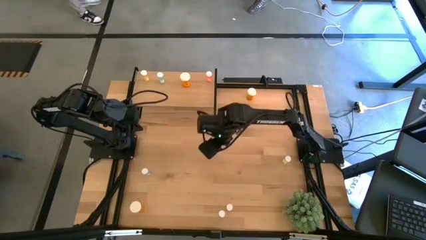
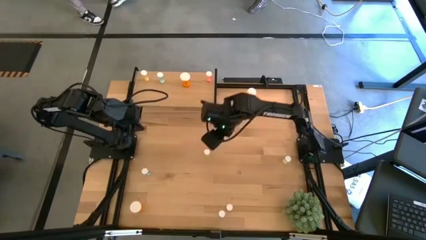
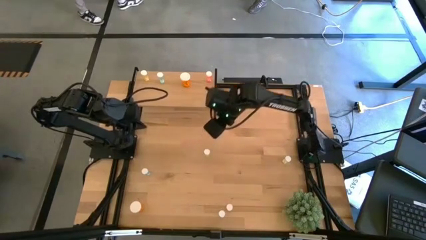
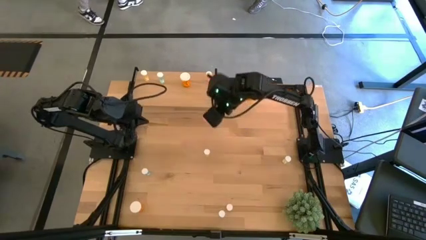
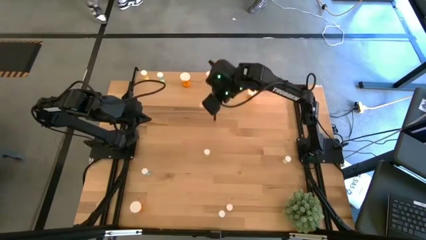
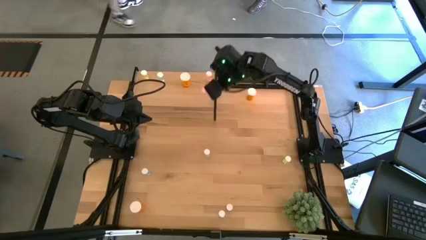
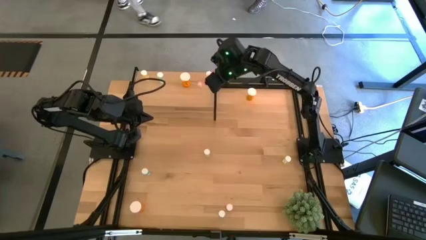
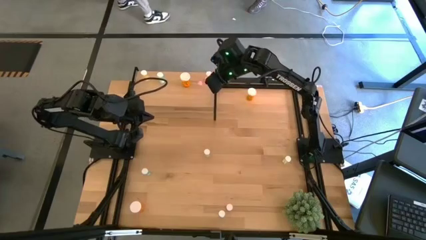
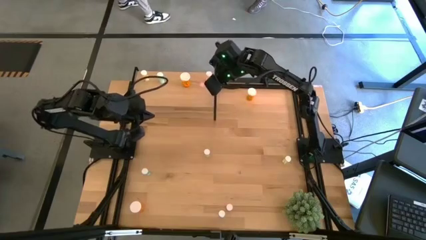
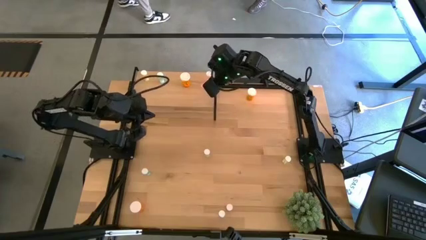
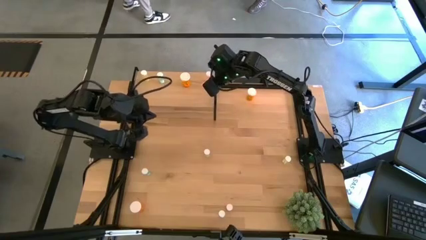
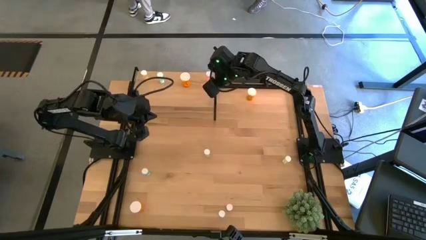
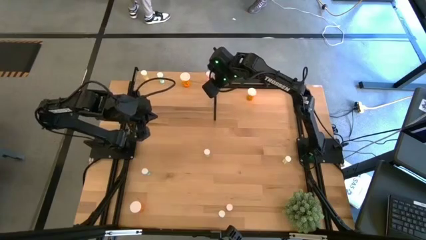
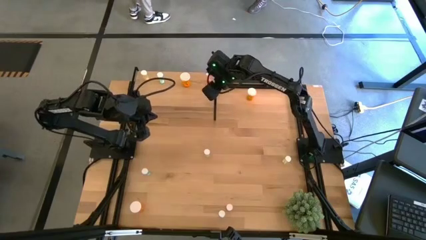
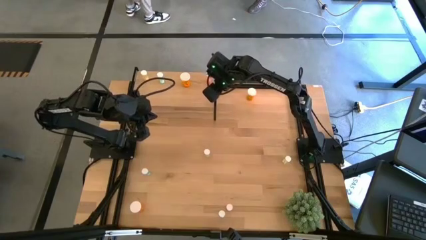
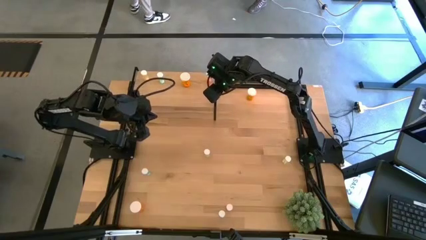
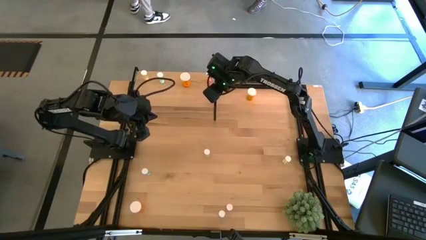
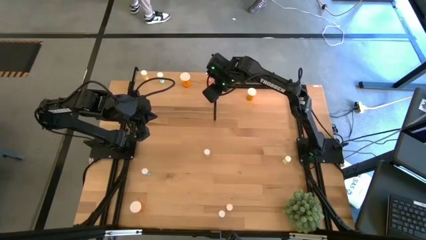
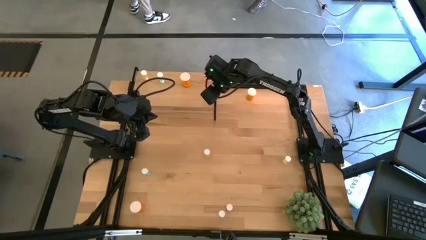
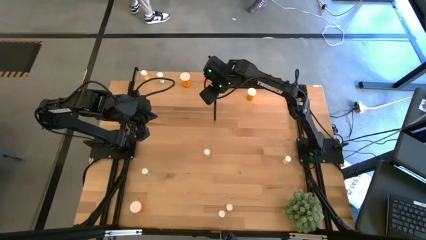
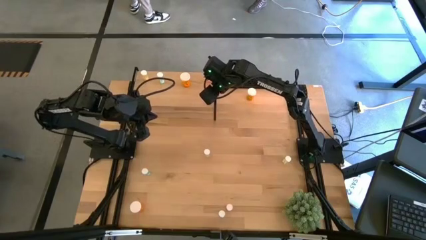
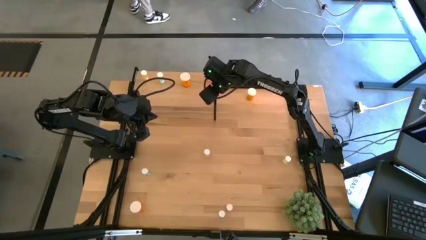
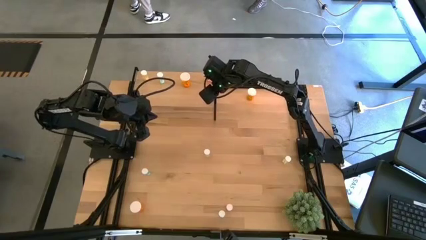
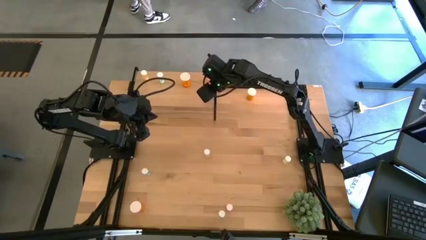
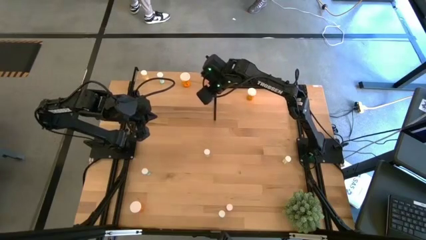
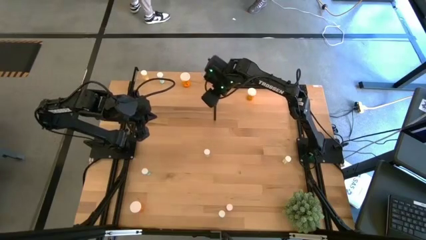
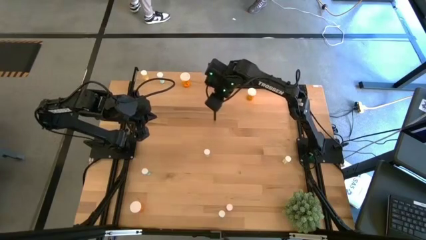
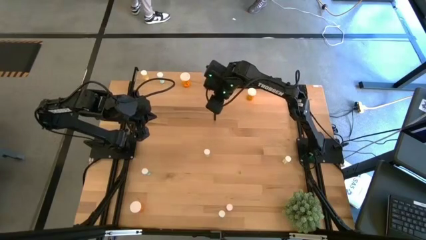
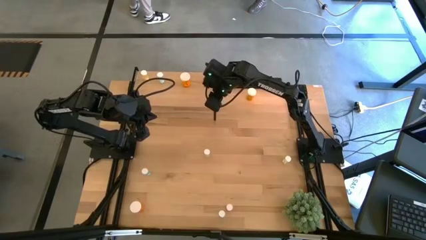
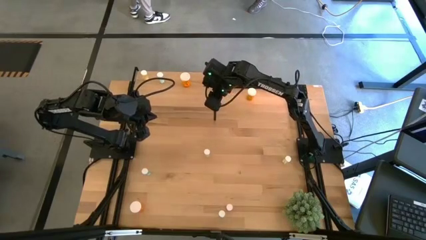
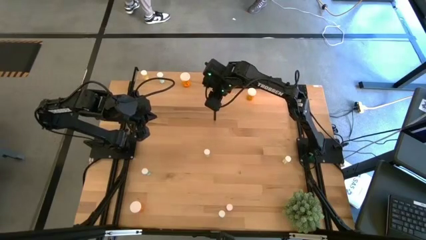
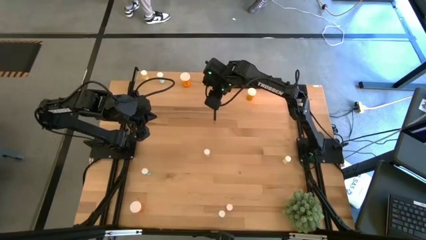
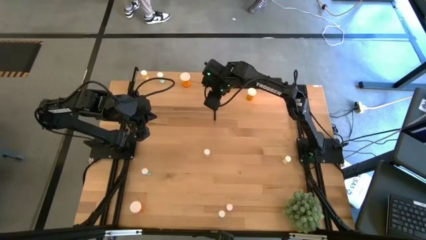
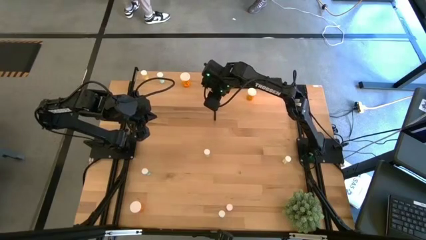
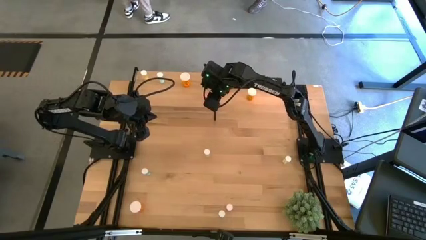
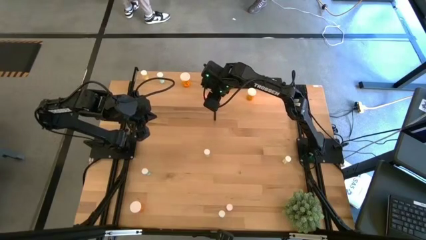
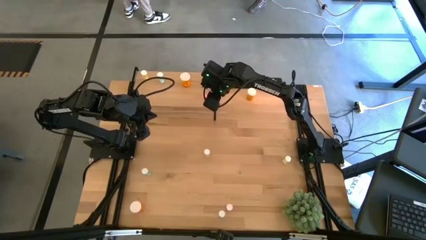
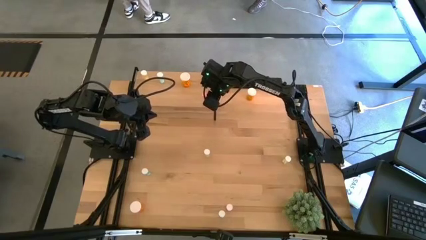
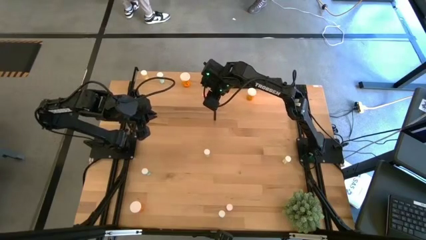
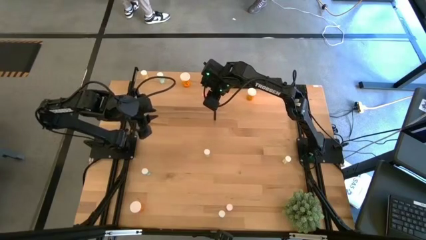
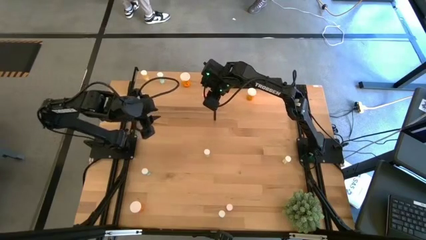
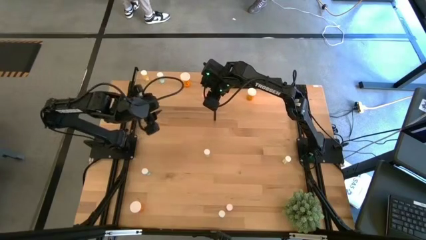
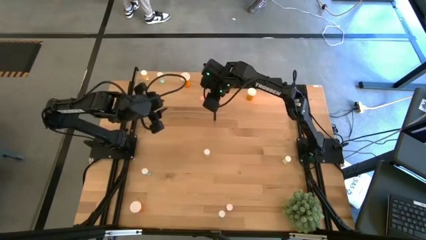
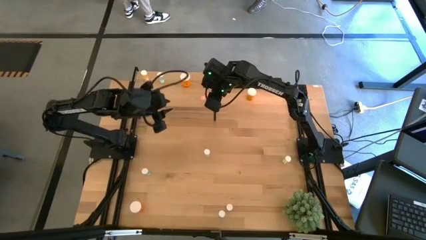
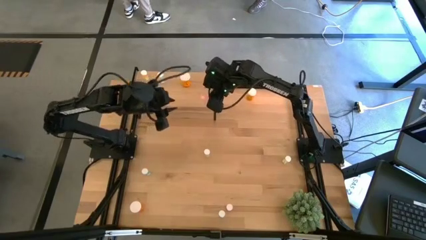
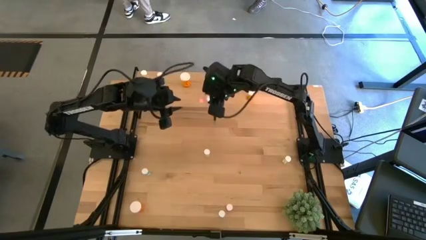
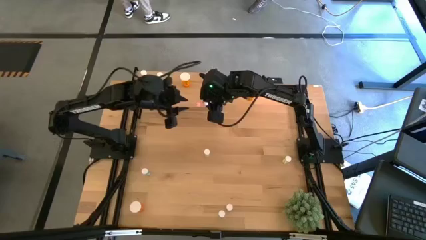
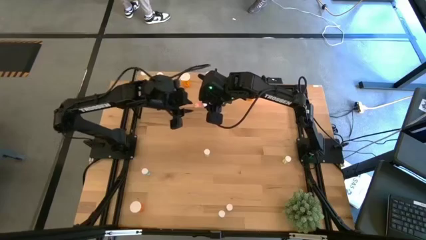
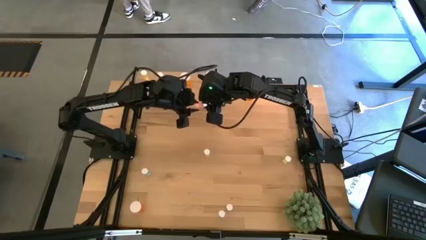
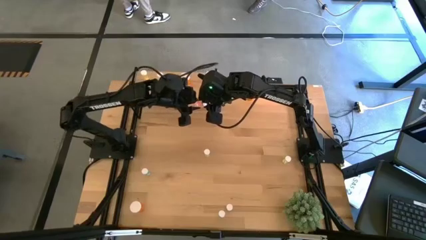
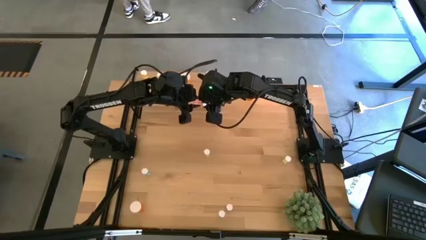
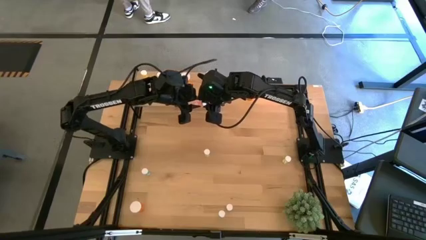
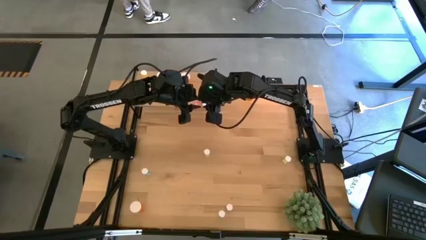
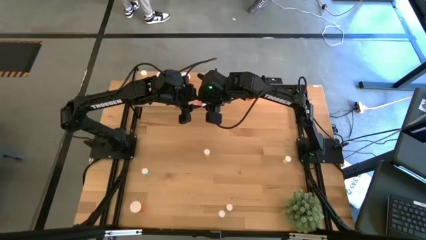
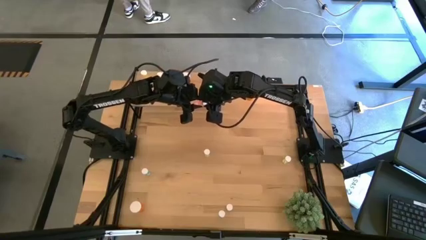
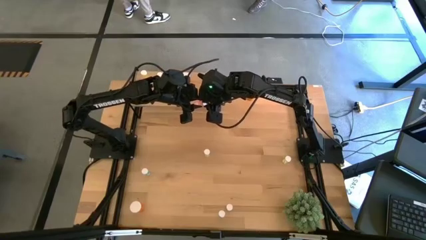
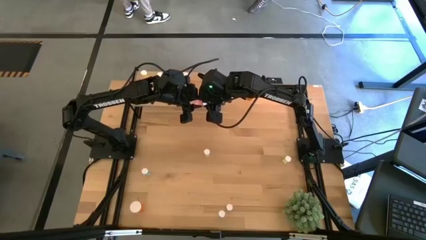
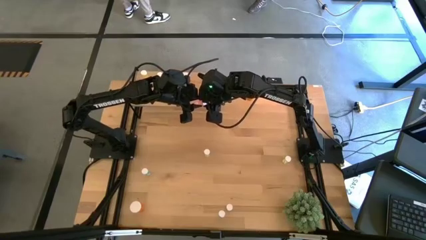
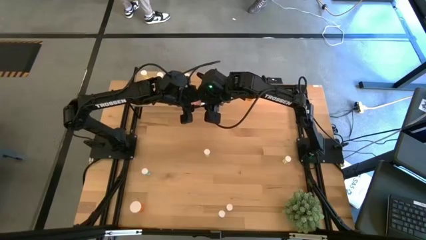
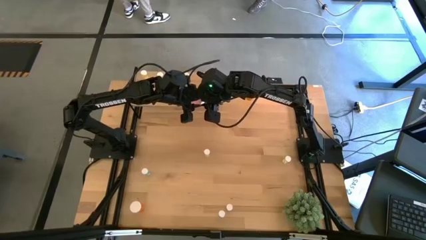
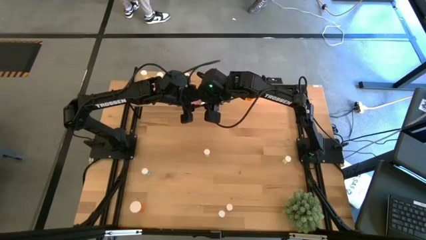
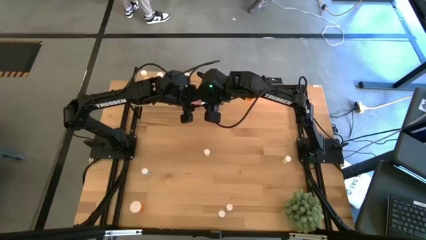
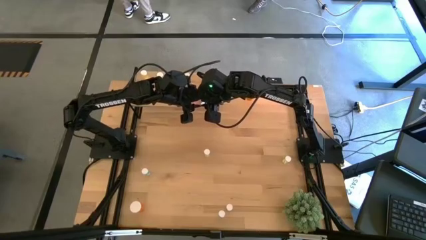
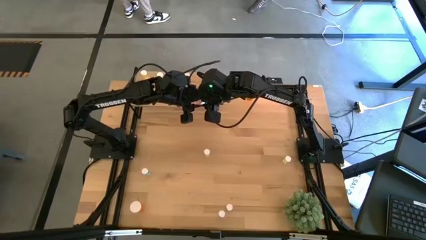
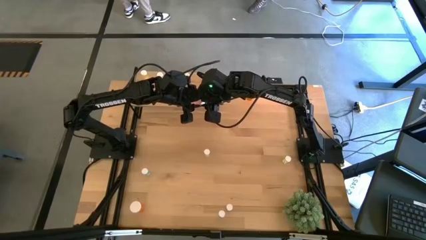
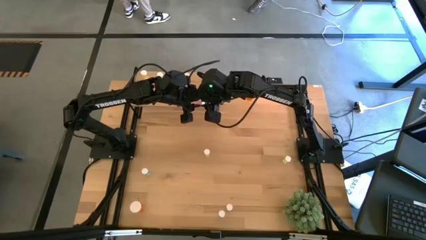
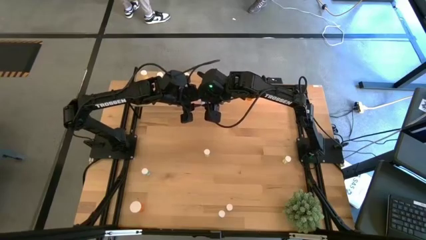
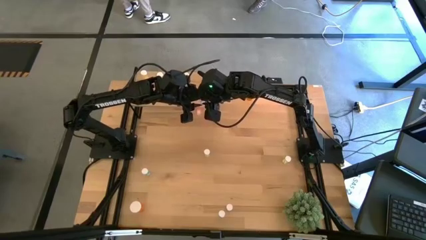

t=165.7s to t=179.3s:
Task: Pick and place medicine bottles onto shelf by color
Put the top small red pill bottle on the shelf
